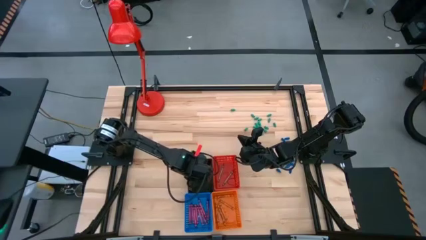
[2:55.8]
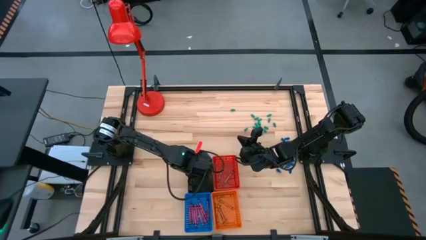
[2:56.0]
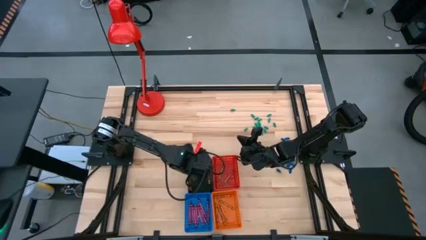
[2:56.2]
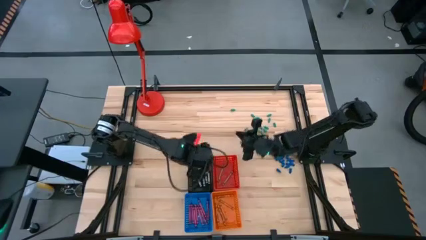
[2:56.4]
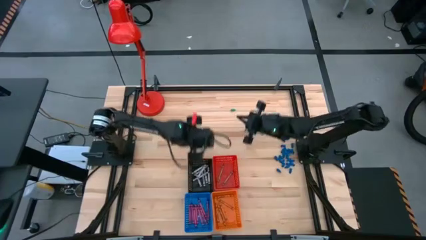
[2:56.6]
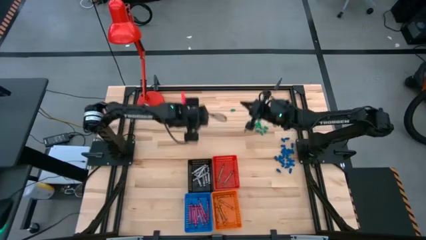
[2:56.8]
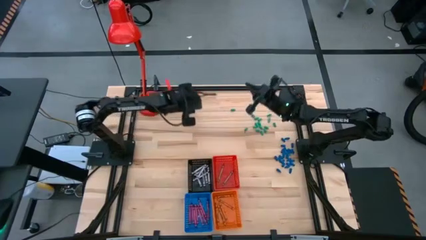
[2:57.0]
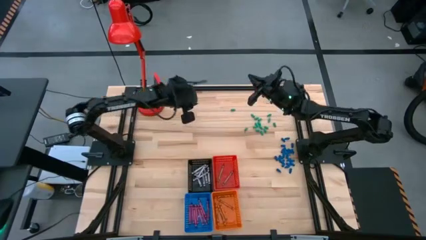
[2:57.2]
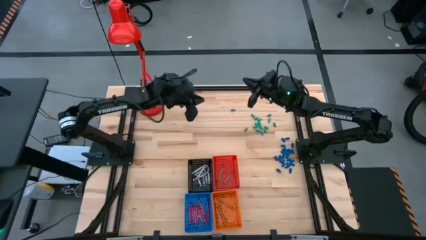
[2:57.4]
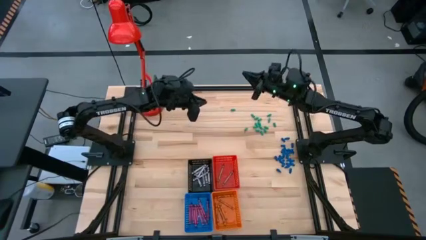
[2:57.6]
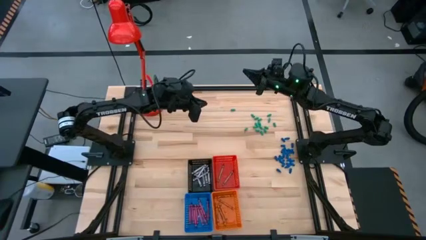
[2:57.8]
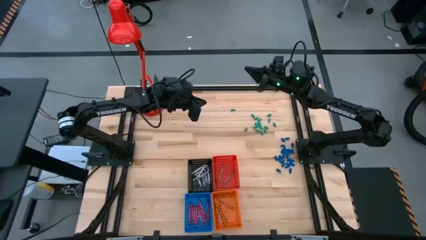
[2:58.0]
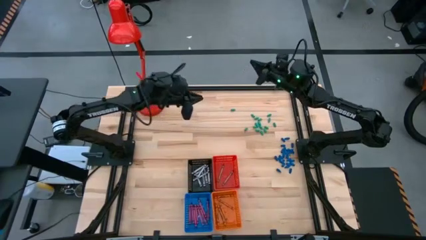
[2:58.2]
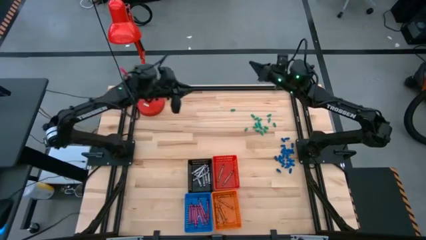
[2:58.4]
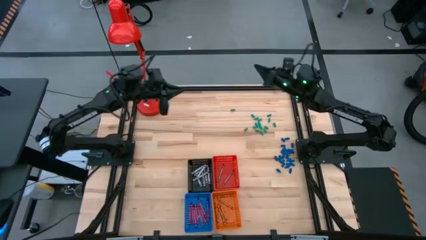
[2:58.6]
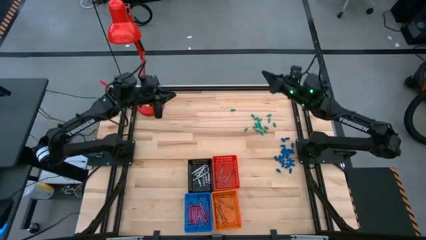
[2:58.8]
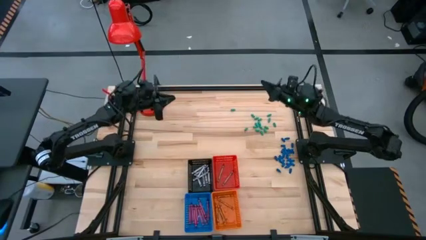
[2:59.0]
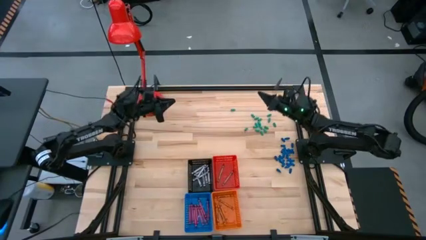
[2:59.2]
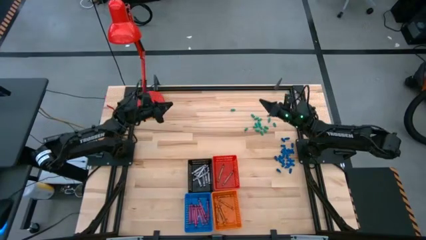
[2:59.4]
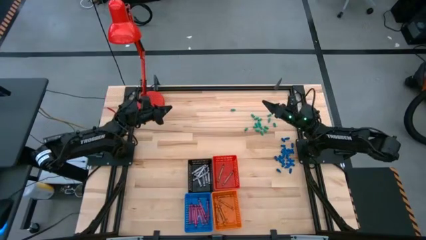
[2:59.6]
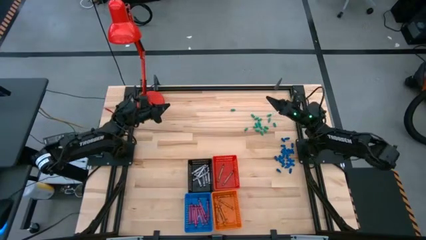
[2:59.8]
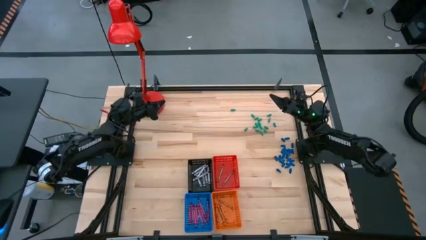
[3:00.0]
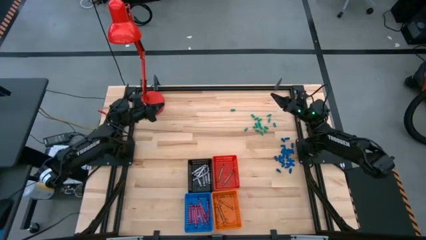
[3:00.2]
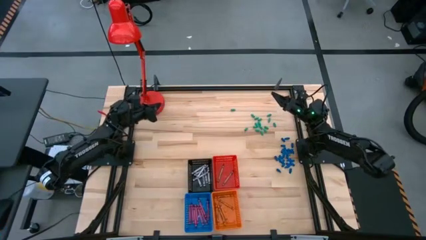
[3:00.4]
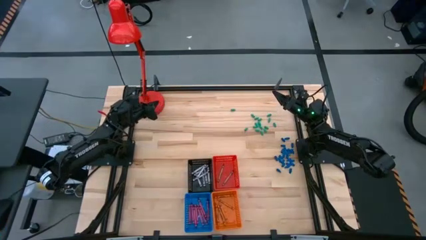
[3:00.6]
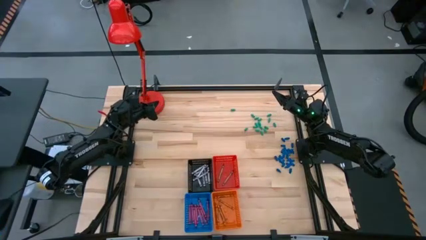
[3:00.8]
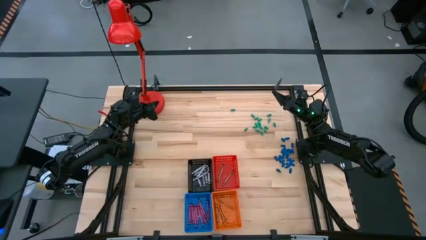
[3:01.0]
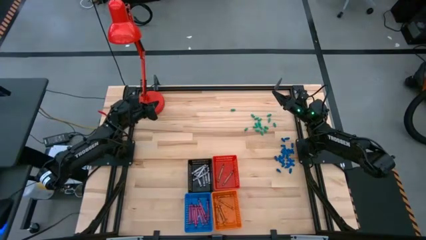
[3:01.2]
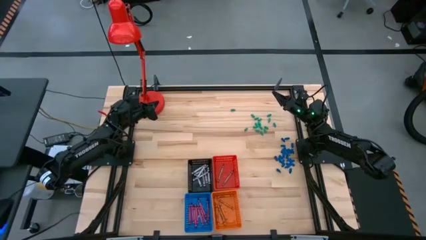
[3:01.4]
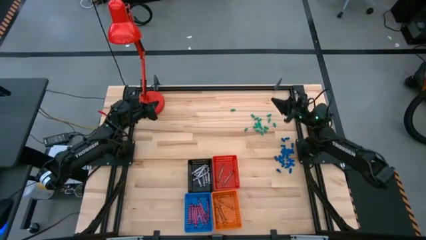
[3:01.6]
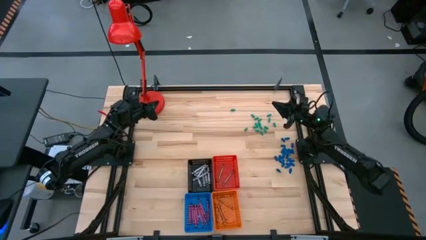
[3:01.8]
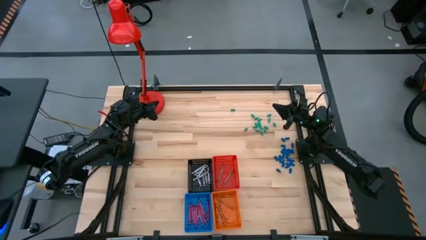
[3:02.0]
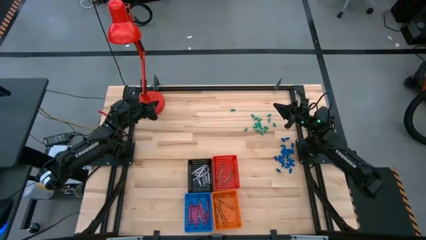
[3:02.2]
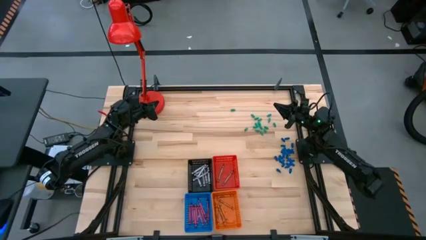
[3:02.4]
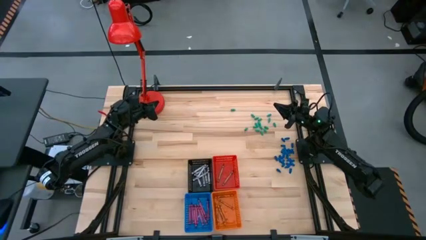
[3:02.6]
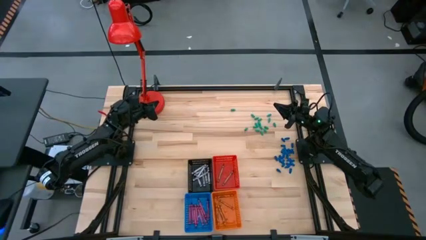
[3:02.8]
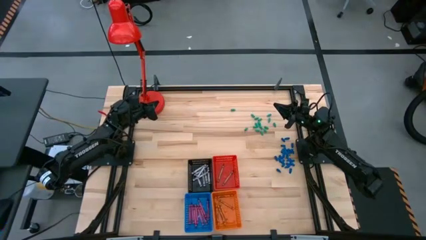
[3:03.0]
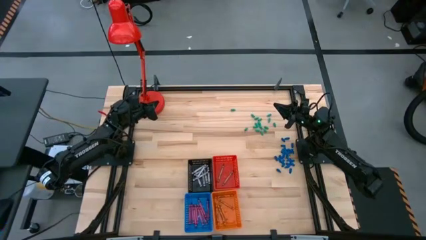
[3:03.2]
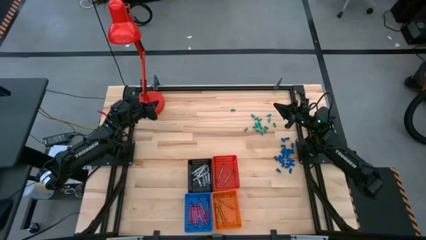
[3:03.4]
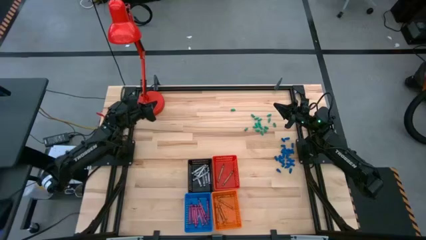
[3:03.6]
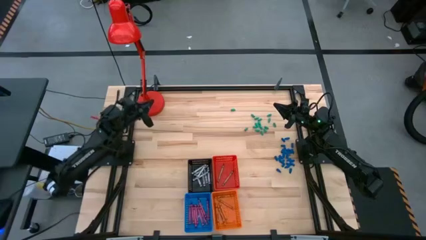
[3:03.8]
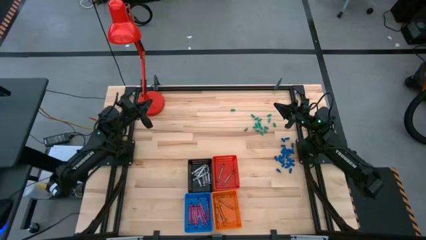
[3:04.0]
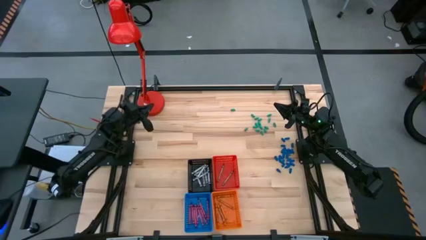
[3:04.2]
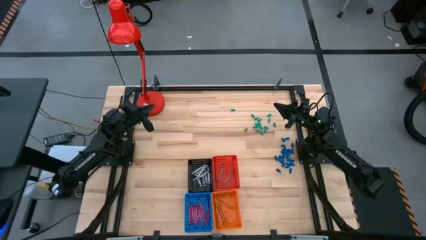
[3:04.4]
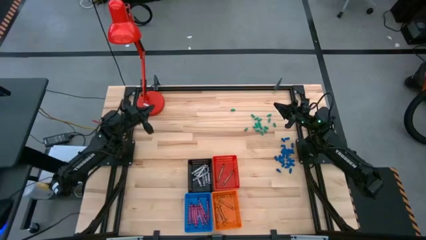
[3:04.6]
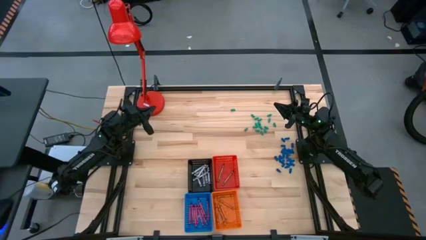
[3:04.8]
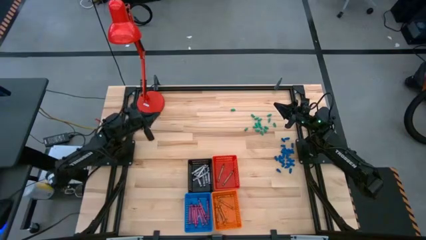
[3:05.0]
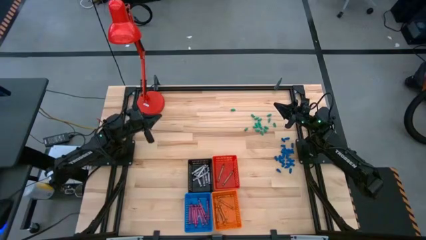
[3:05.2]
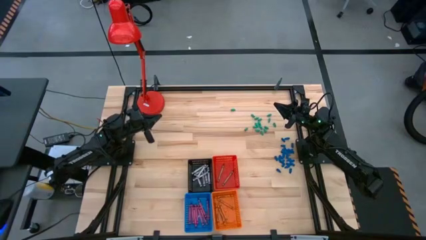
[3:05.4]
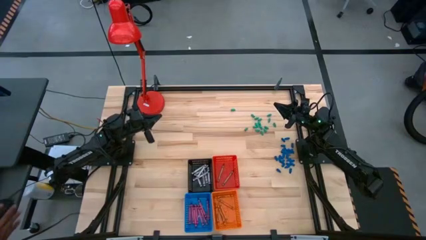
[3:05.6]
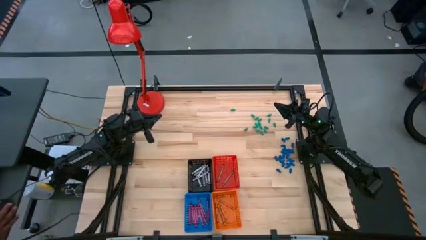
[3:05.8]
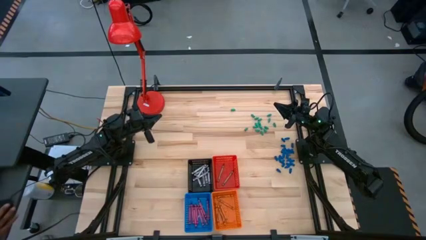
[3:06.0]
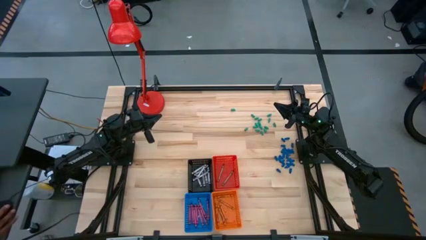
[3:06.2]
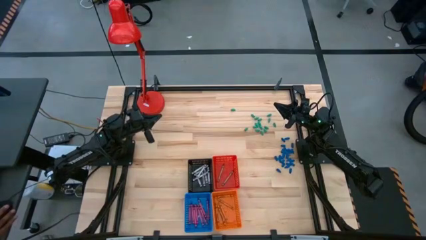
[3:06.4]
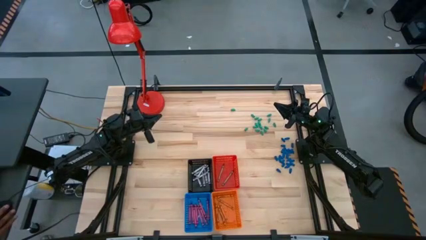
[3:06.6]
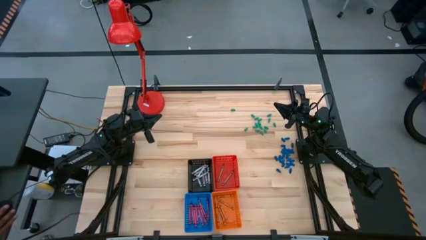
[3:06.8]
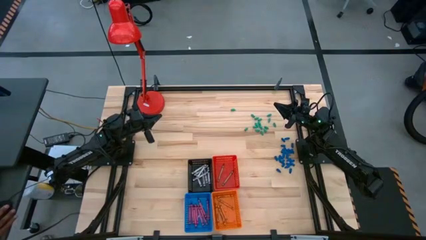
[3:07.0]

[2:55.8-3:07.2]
Task: Sort crayons
Return to Home Position
